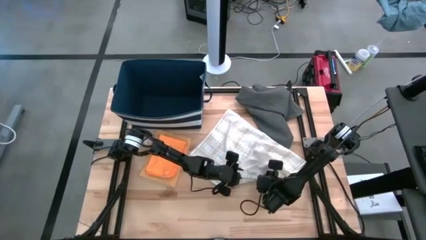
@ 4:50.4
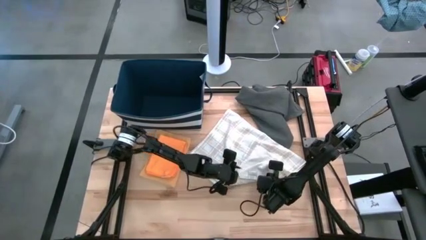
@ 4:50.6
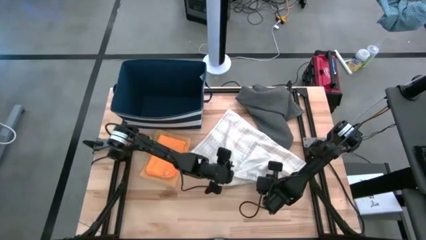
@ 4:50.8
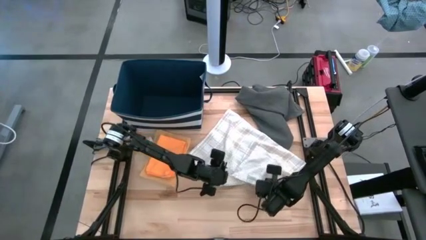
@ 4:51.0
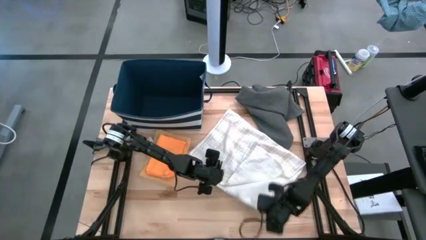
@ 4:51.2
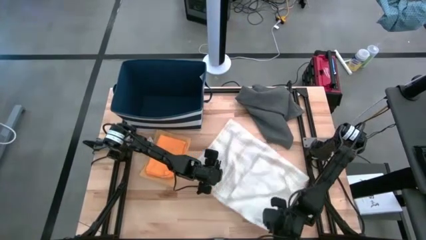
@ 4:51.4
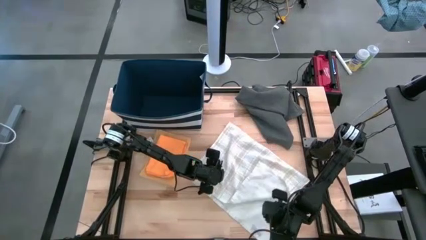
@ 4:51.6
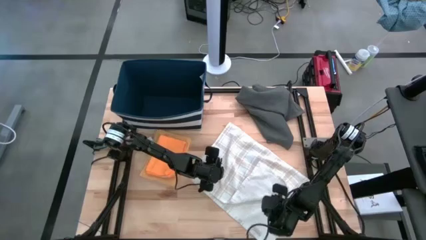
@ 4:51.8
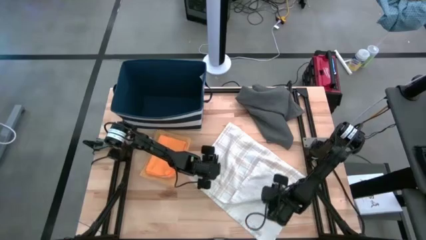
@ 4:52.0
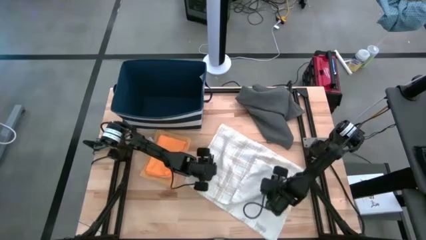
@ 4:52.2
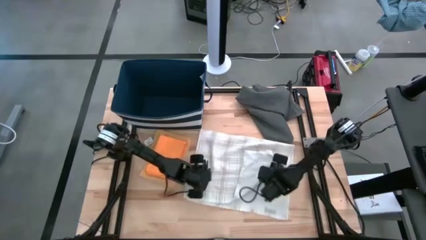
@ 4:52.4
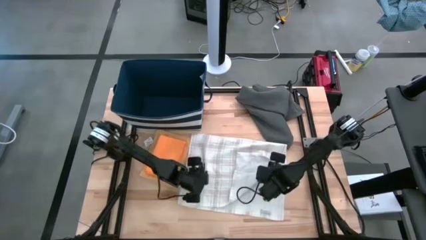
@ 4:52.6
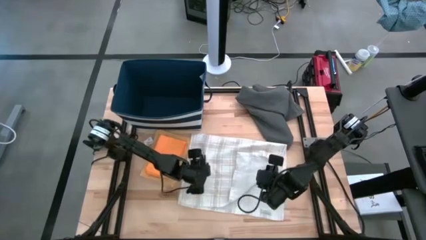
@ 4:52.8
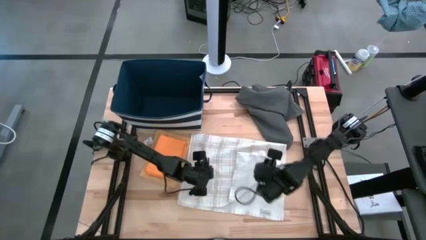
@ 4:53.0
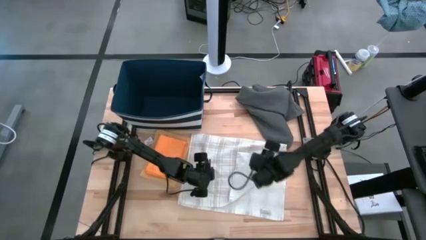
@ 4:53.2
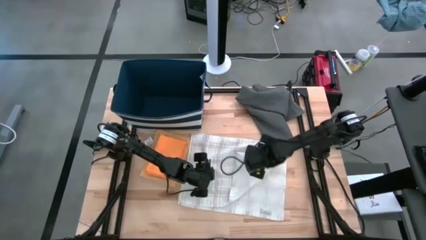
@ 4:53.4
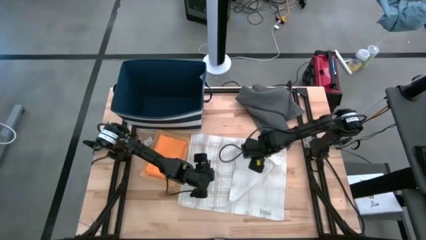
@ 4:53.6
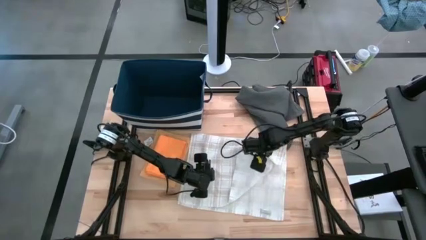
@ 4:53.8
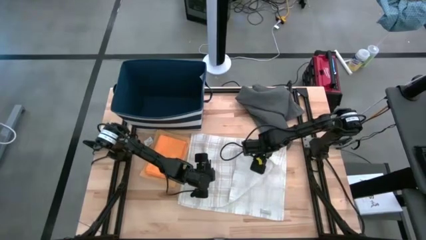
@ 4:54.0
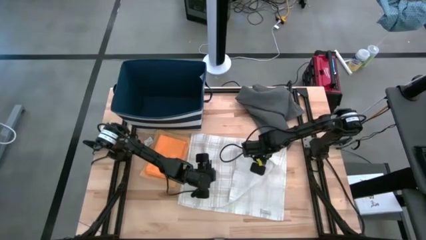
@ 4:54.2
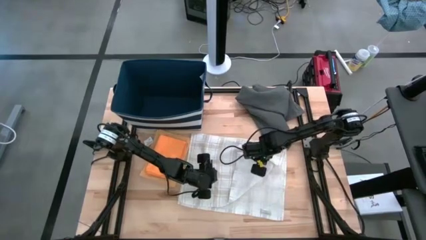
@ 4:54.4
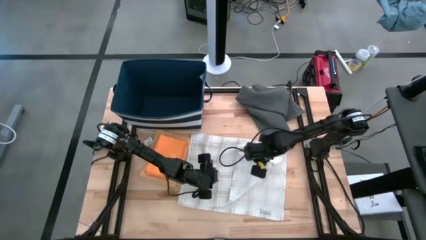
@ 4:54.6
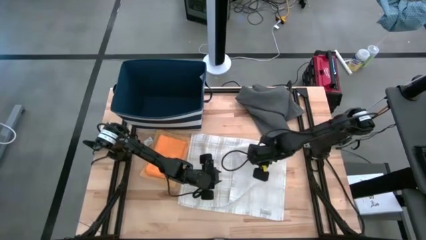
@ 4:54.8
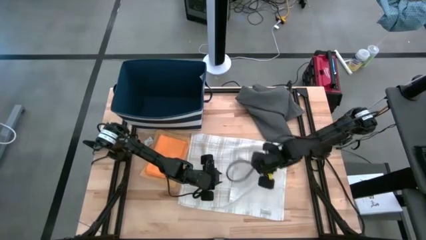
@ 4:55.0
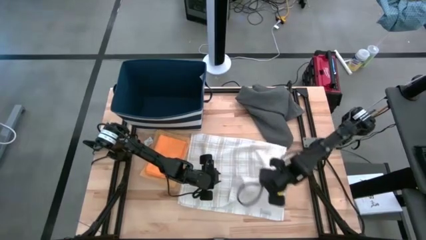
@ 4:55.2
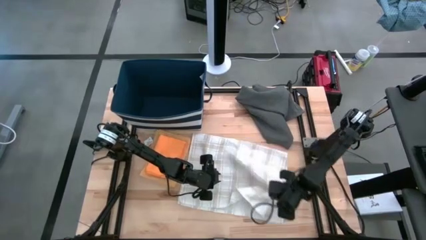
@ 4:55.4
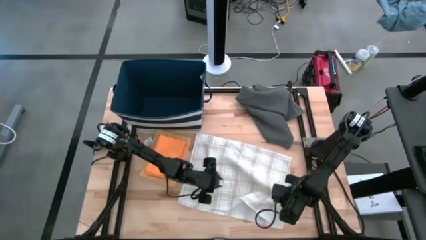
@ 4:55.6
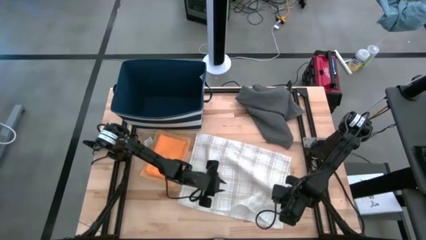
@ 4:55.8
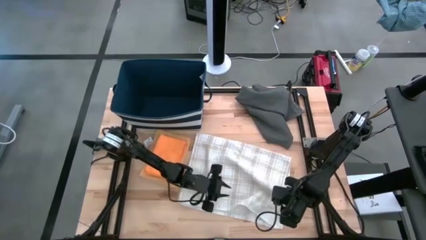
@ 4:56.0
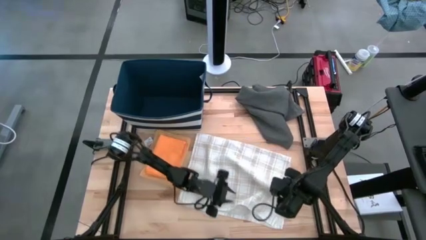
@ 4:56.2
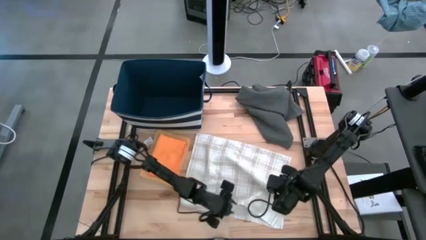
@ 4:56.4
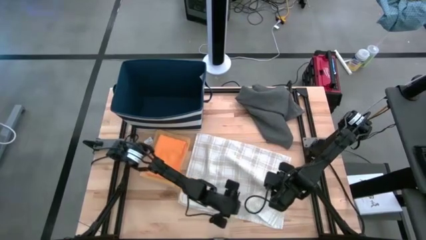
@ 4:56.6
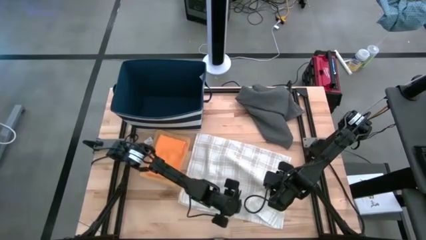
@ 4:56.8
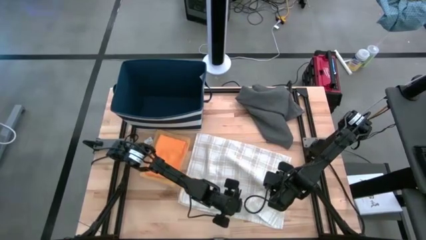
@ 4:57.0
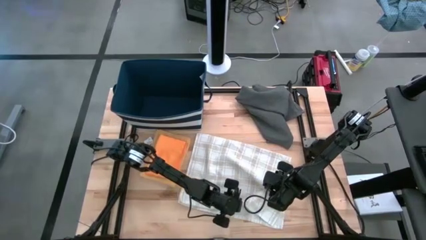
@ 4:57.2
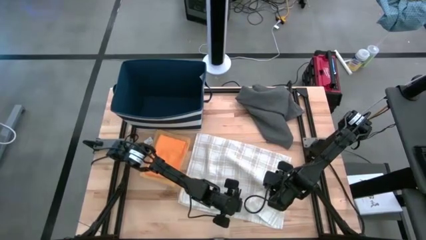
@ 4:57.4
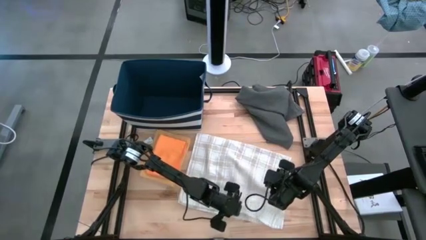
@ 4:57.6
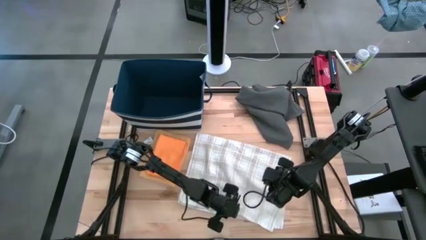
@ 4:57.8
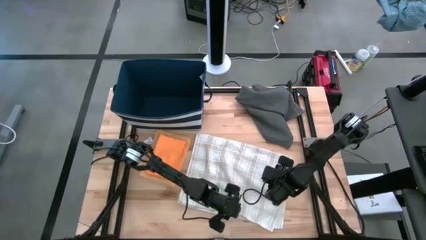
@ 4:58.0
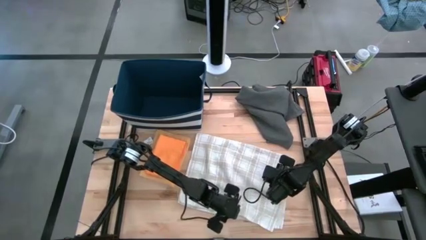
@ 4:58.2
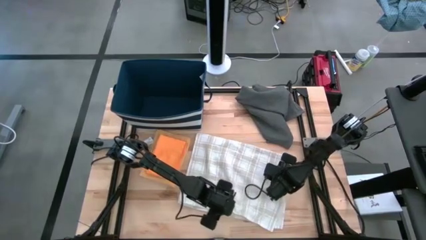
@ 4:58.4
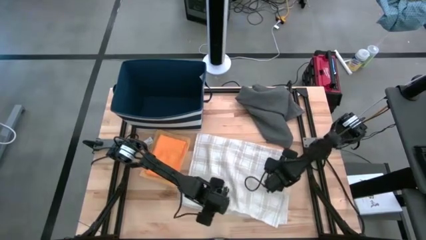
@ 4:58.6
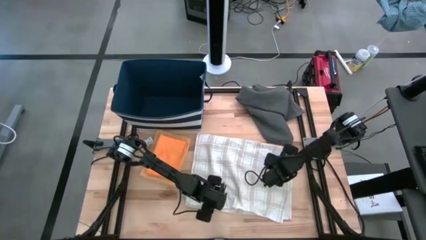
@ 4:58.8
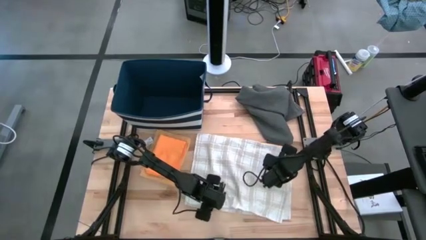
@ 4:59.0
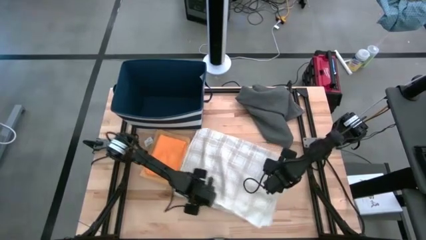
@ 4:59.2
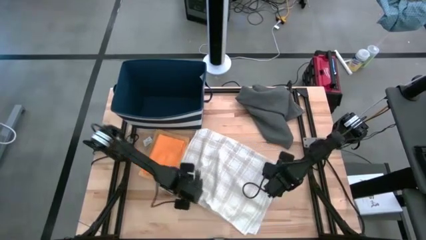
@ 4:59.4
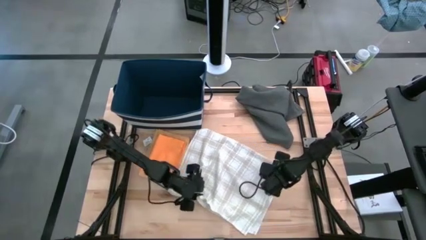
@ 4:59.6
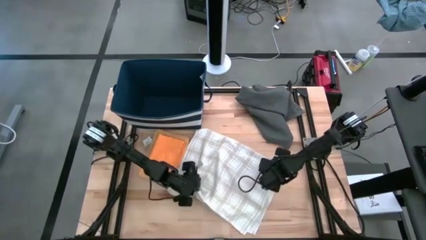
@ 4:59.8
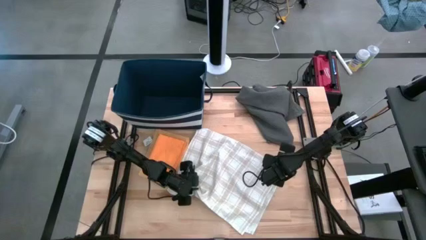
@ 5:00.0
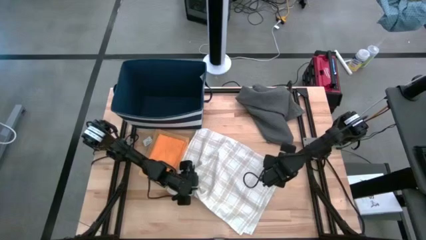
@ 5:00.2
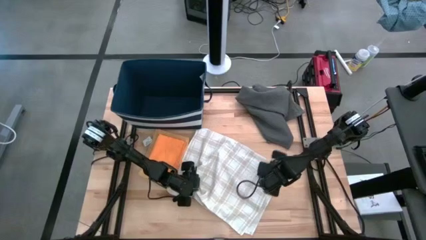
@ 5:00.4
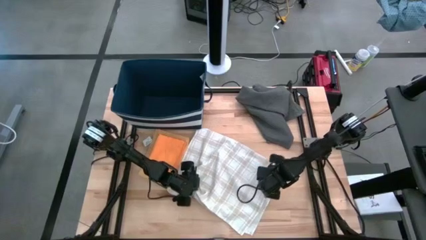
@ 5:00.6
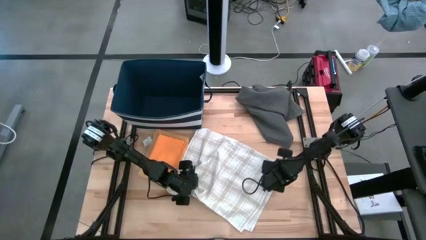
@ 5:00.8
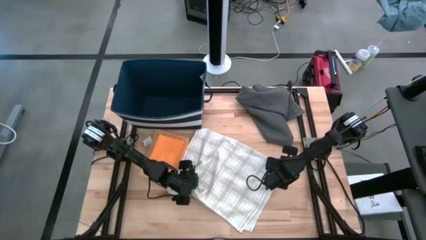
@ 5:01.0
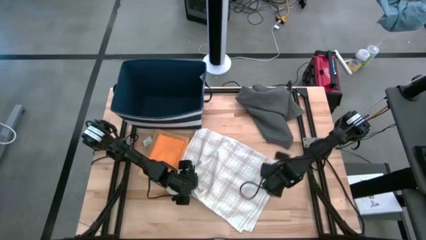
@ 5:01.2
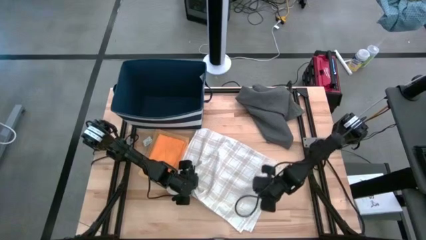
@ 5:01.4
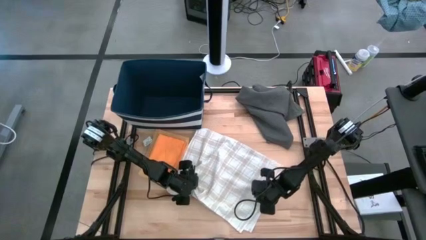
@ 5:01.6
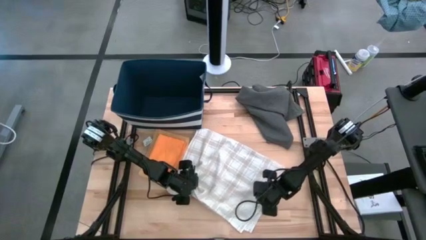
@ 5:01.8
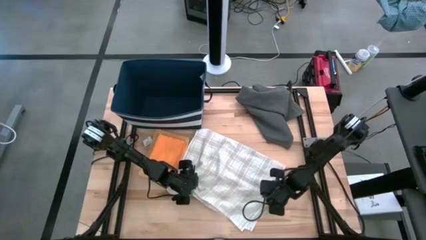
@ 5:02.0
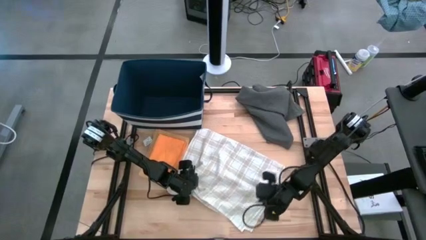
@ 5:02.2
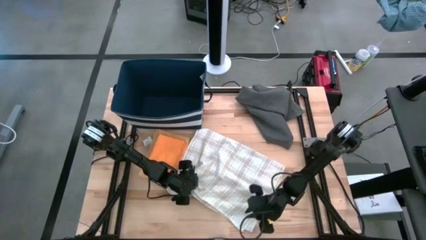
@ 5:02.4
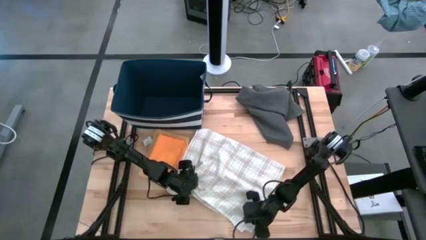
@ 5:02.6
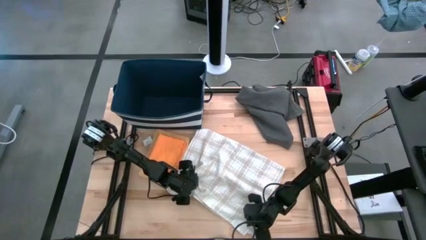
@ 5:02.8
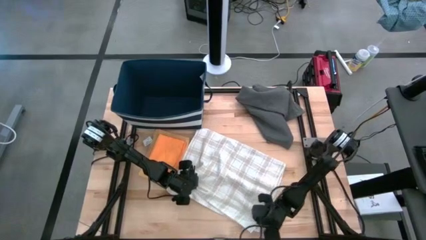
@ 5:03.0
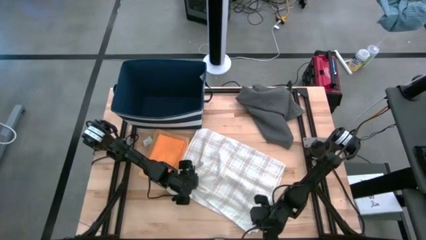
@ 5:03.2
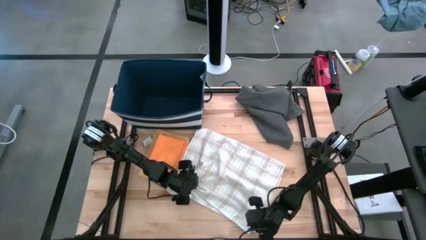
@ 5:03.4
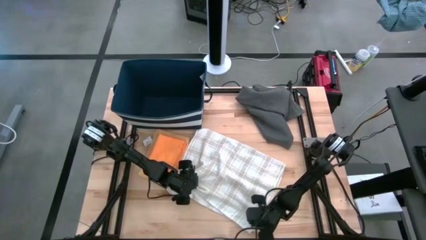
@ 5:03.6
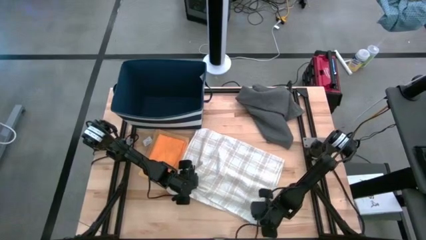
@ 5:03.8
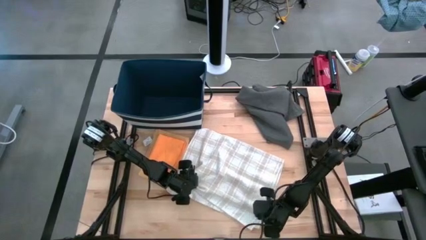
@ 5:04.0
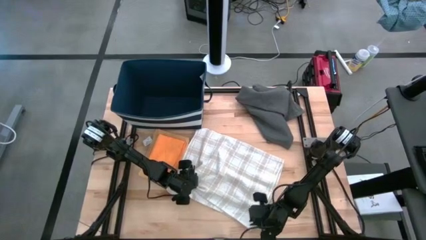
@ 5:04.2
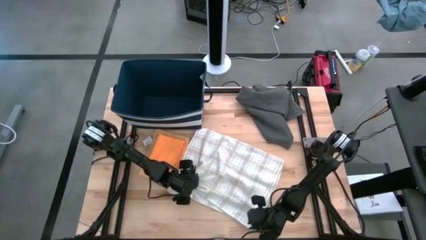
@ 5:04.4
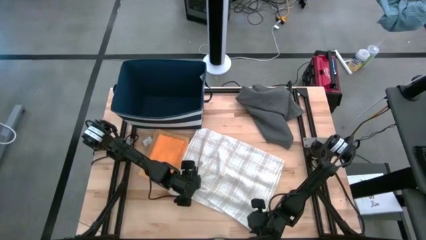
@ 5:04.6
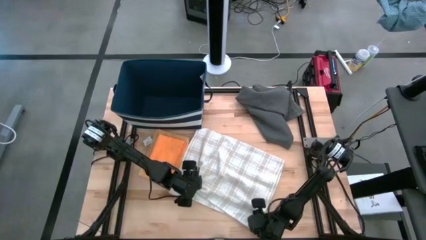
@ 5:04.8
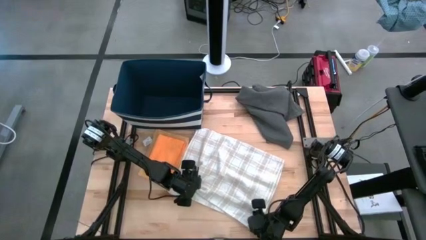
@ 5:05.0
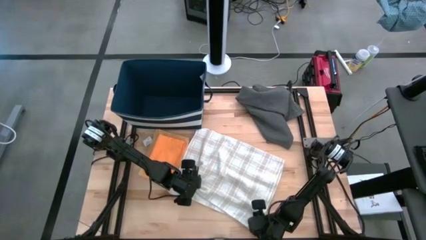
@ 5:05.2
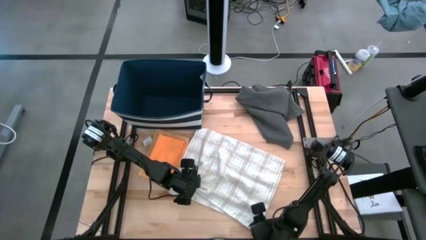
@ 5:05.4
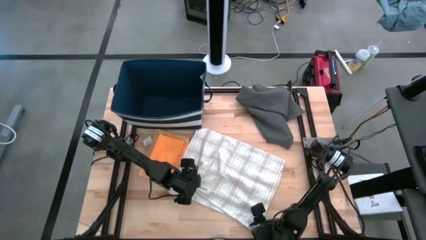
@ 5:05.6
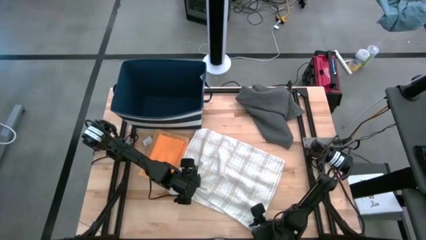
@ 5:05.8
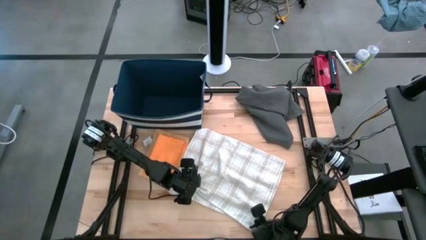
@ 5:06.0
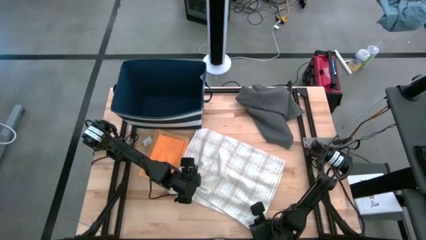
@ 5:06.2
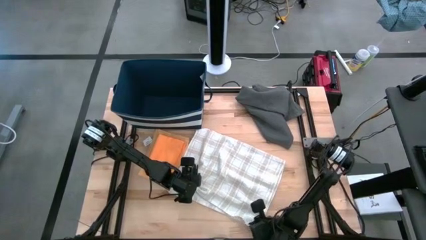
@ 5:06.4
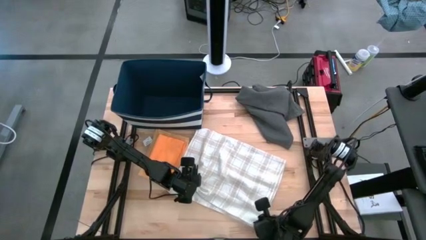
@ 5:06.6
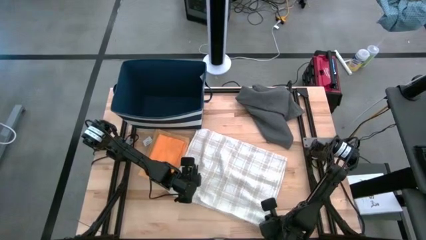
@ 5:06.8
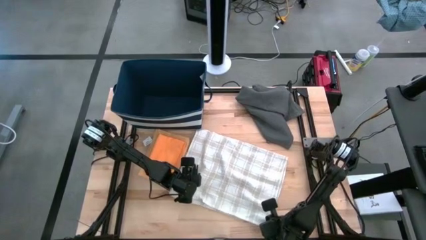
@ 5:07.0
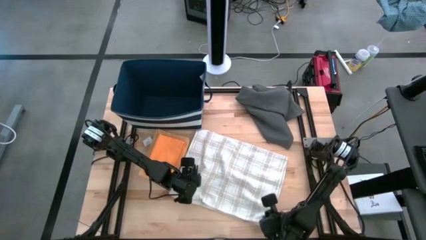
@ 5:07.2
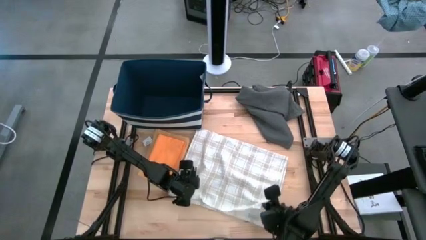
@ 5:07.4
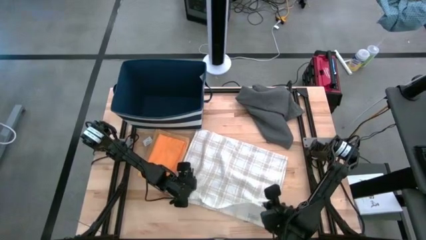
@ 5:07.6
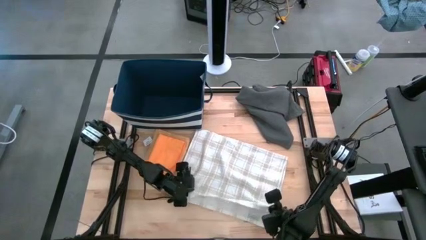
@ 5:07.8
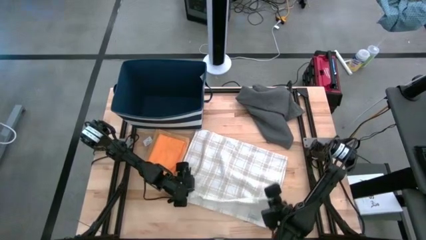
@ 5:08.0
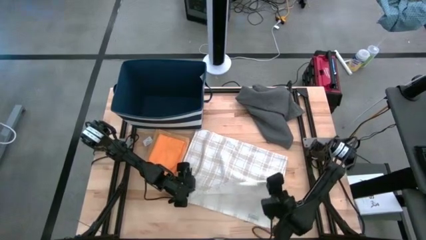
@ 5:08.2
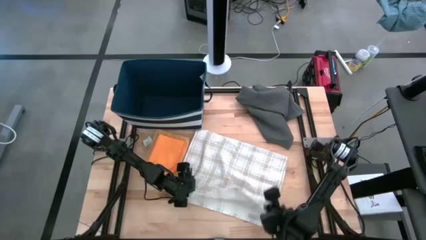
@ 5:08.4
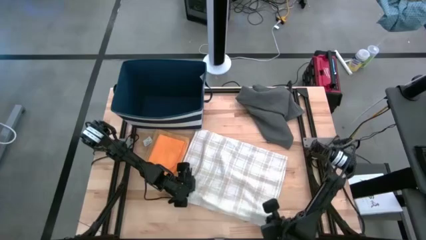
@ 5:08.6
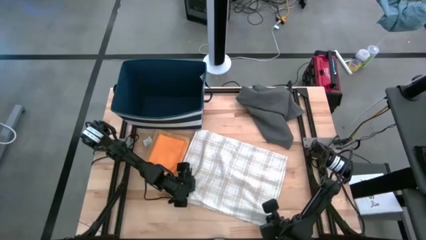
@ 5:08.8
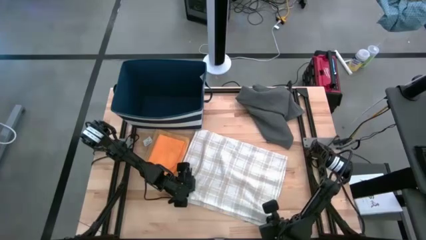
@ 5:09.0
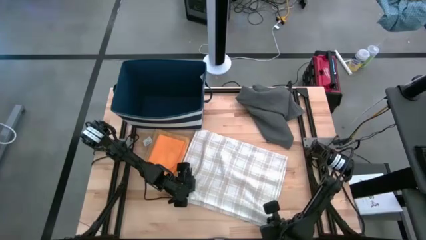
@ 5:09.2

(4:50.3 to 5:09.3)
Task: Fold towel
Fold the white patterned kitchen towel
